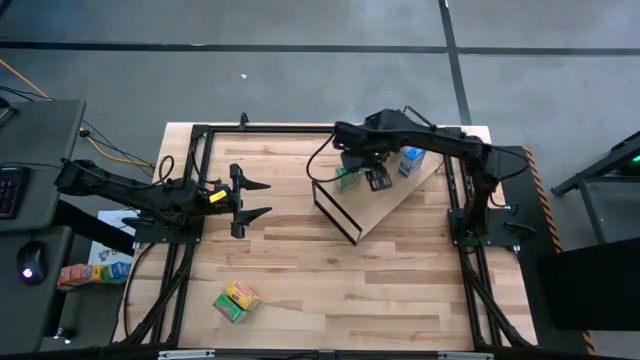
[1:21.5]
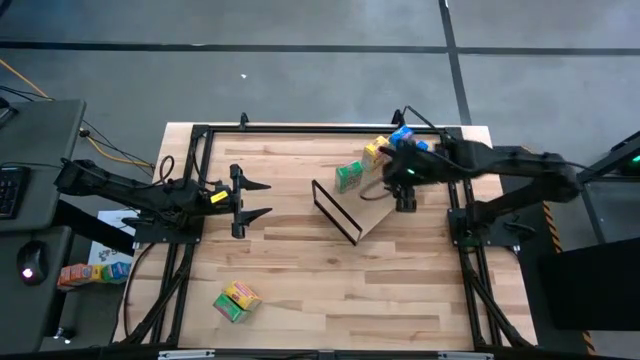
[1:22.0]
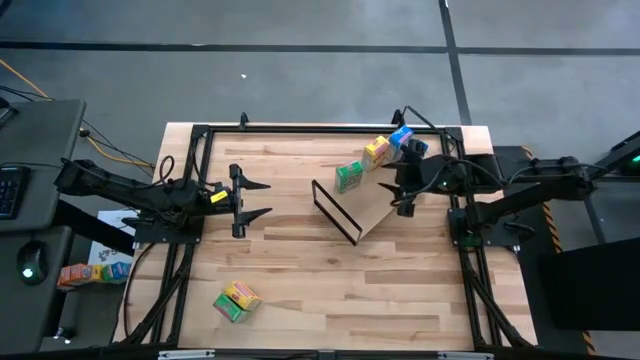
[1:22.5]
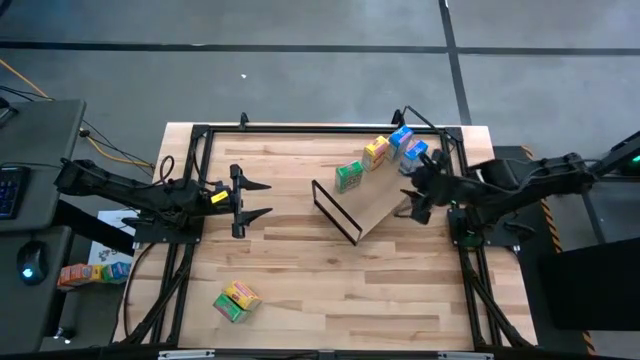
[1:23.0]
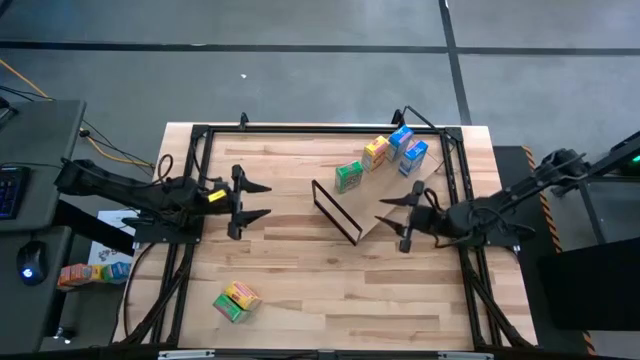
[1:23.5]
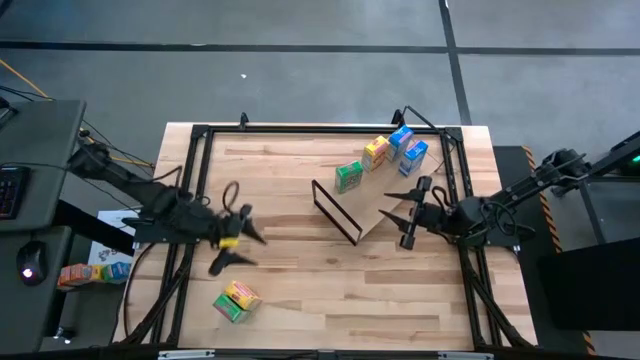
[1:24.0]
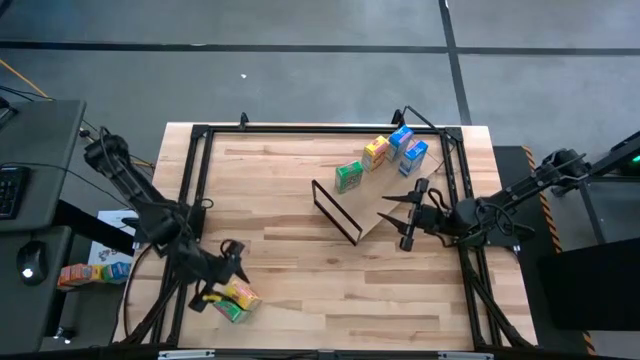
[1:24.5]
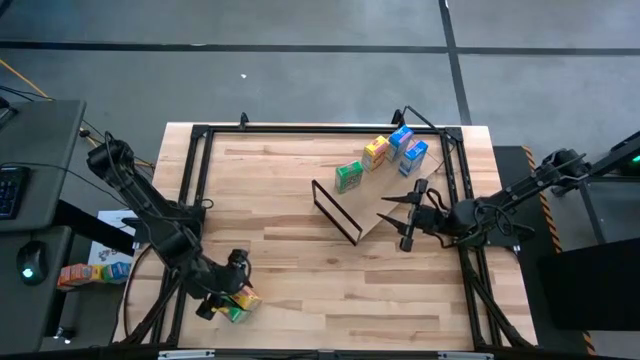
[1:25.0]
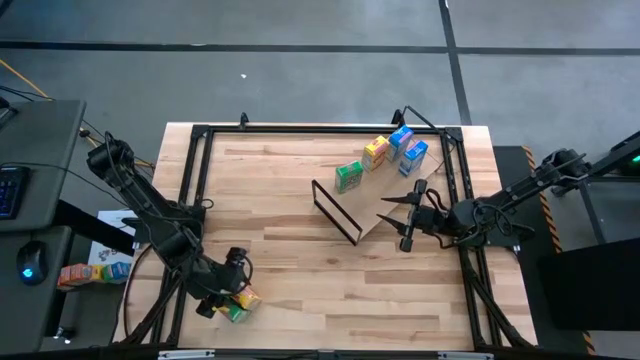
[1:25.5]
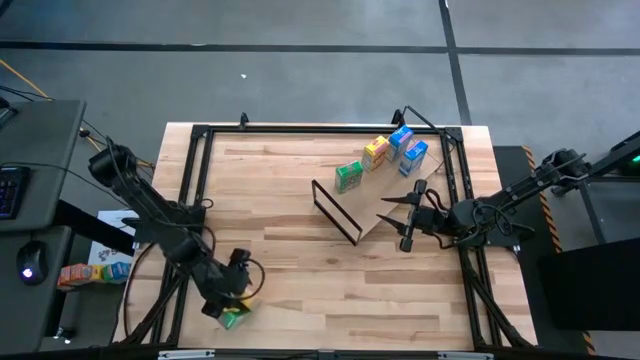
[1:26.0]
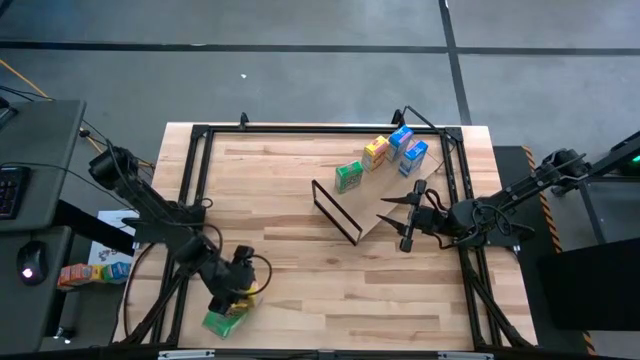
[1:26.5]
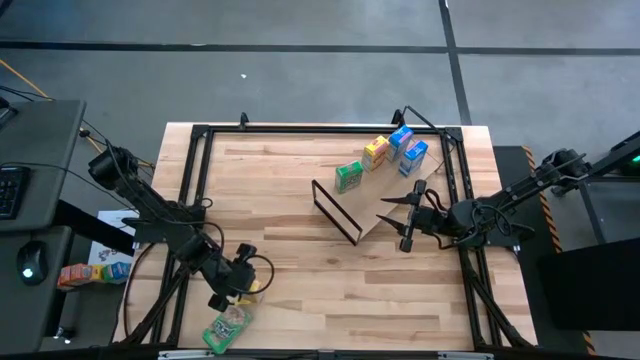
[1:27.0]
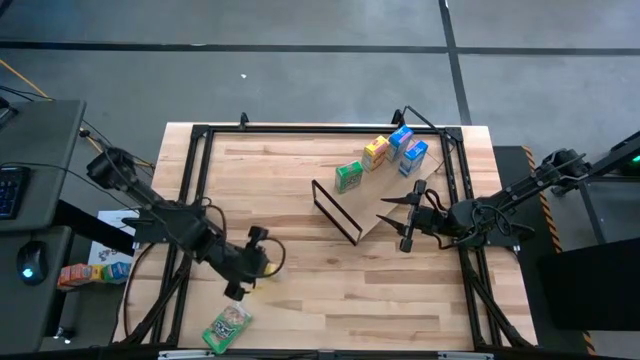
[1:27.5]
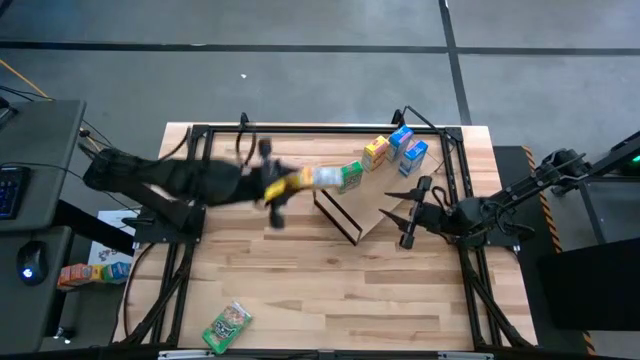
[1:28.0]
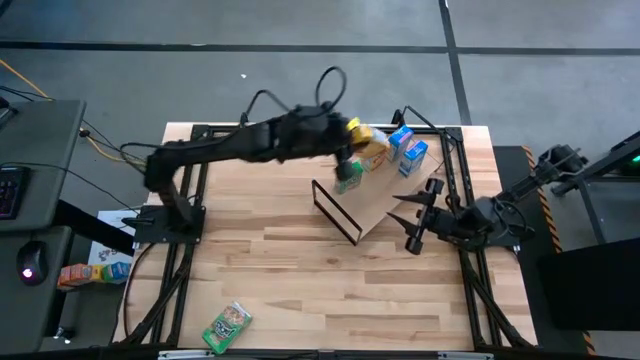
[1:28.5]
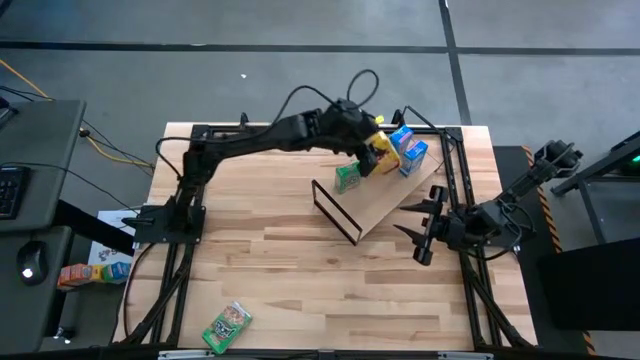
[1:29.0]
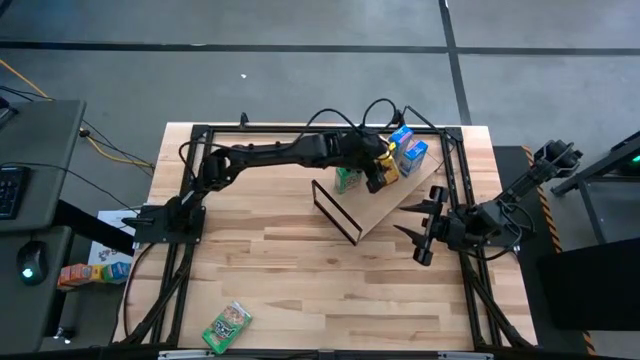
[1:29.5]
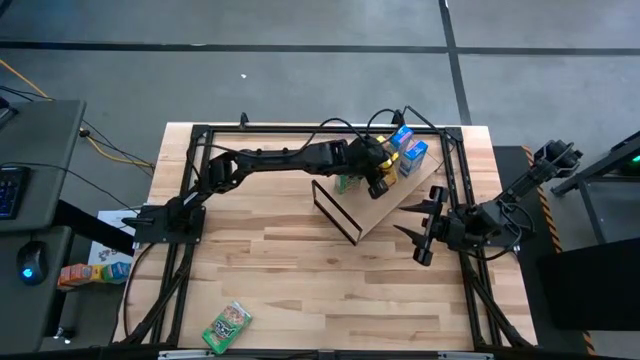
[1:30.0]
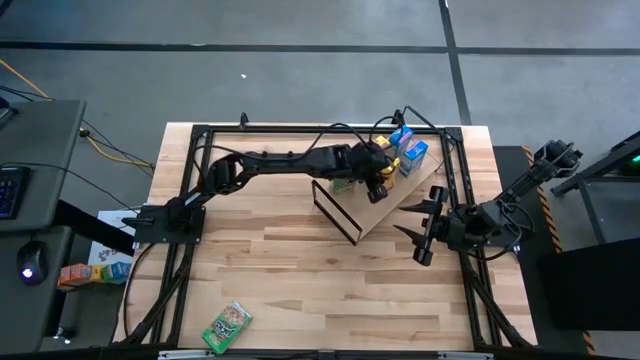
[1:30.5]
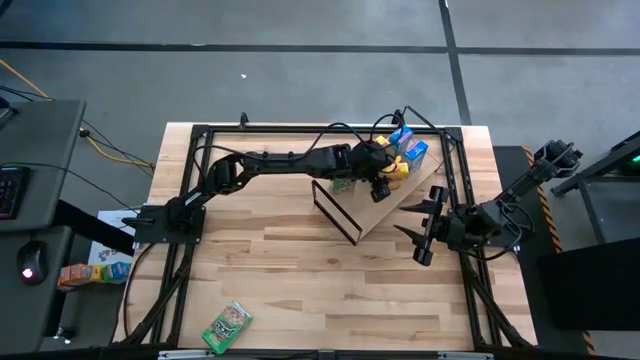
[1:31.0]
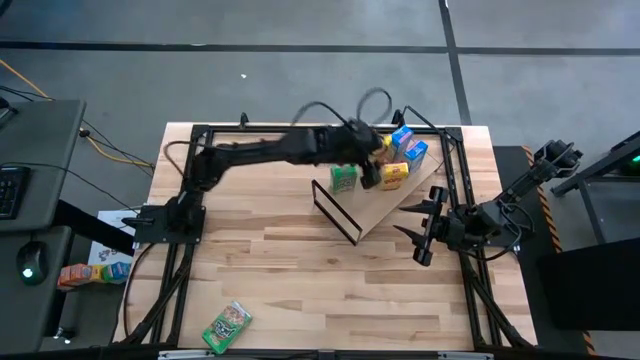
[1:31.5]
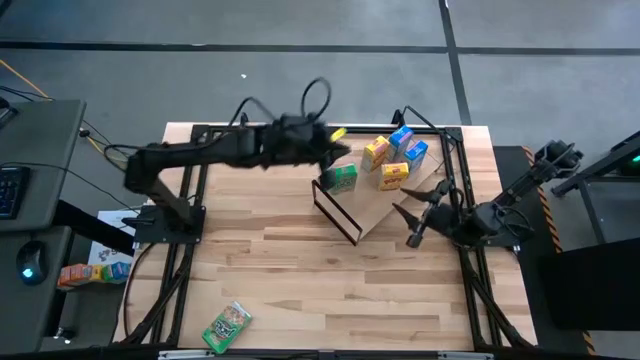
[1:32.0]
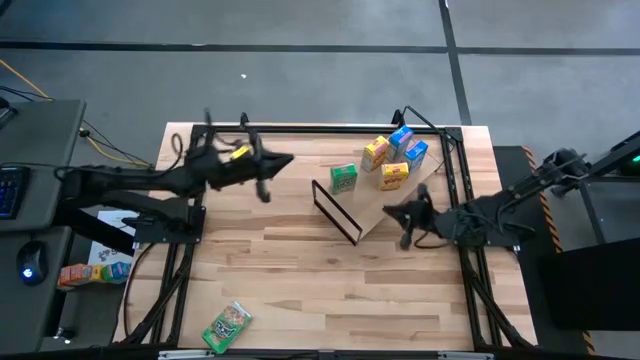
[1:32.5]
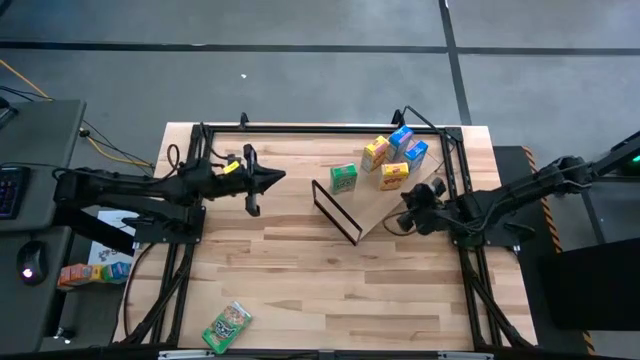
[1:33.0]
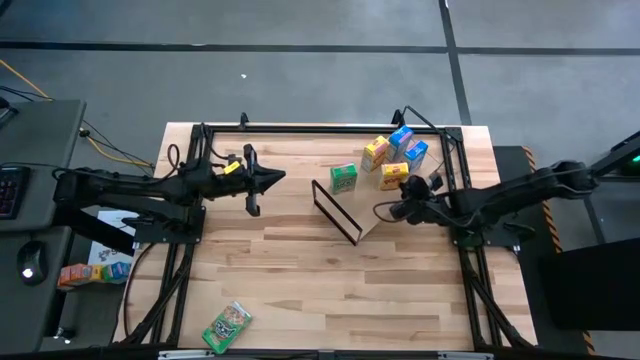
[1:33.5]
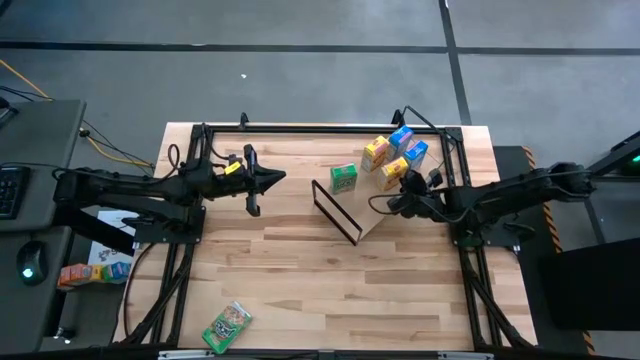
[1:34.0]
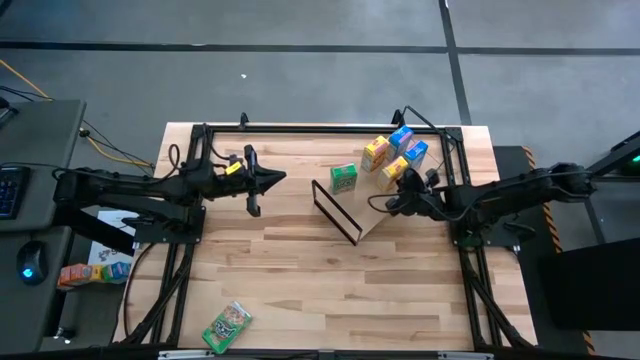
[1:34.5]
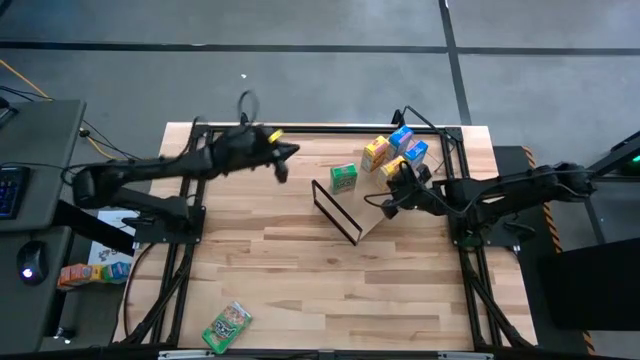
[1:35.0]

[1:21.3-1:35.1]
Task: Stack cereal on shelf
Put the yellow cereal box on the shelf aligned with the yellow cereal box

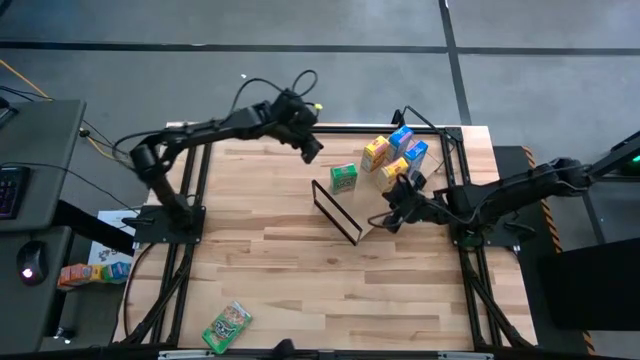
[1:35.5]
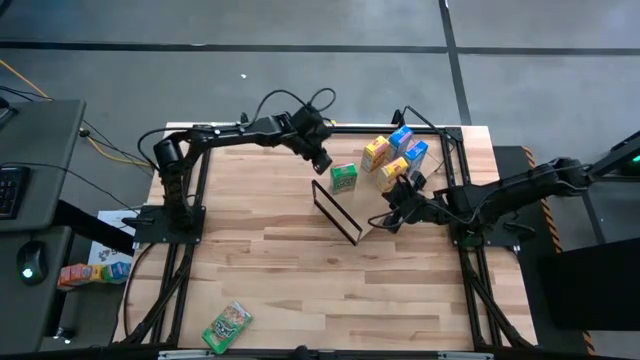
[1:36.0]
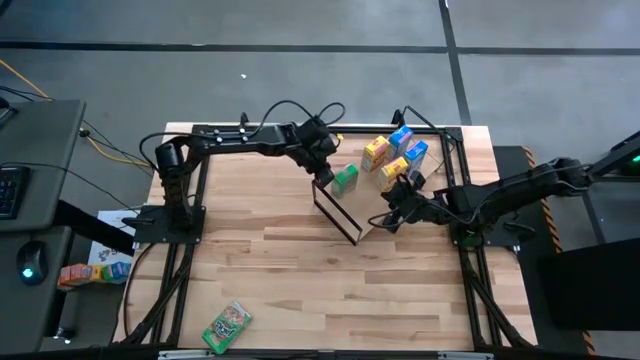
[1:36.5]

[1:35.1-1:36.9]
Adjust the green cereal box on the shelf

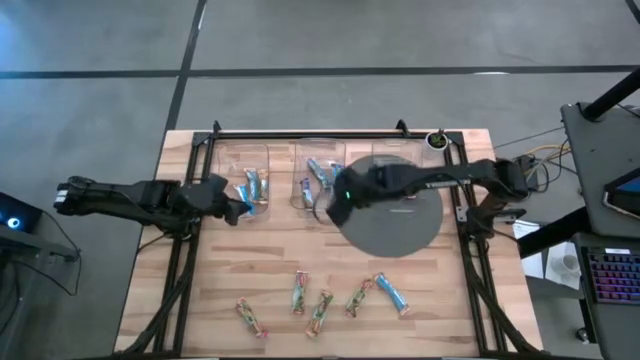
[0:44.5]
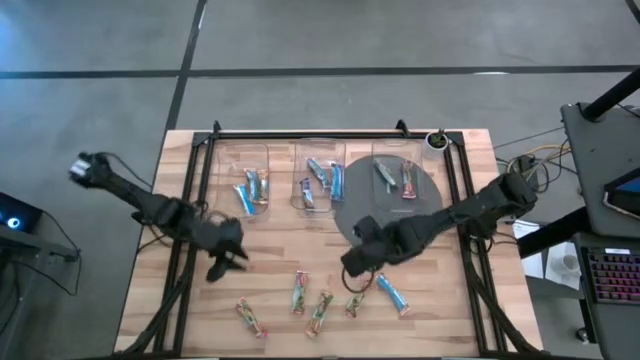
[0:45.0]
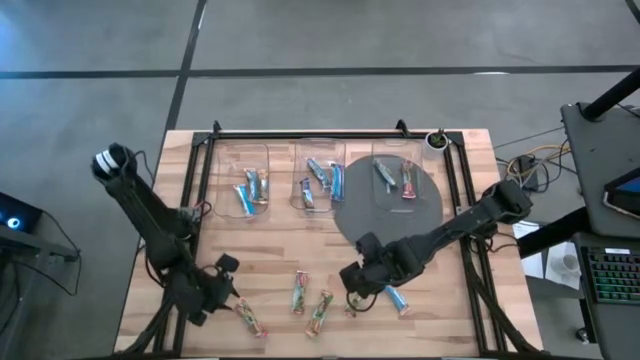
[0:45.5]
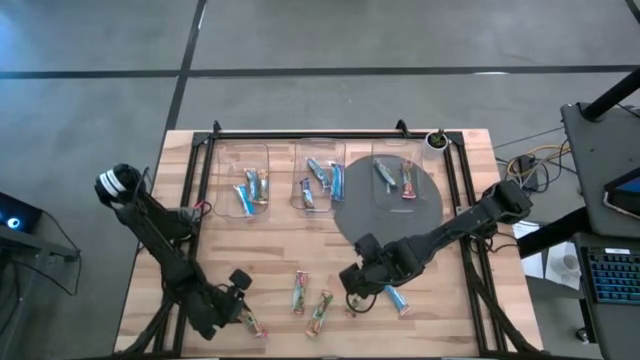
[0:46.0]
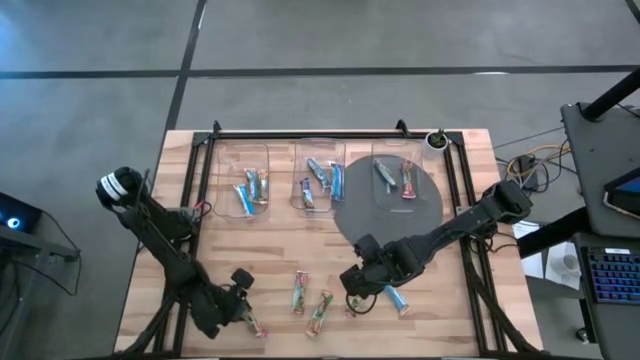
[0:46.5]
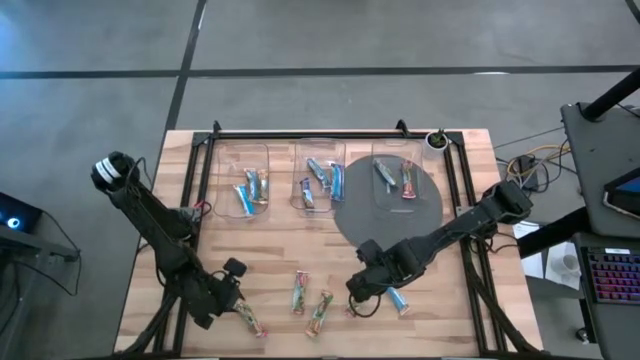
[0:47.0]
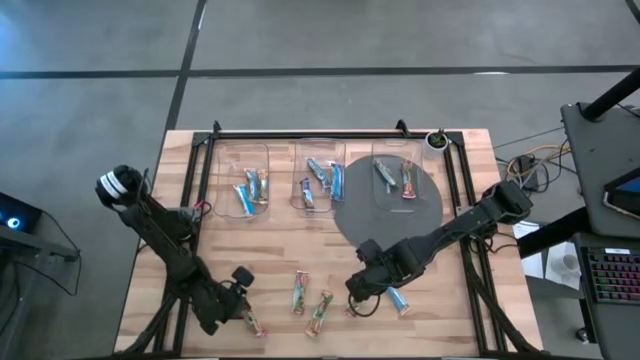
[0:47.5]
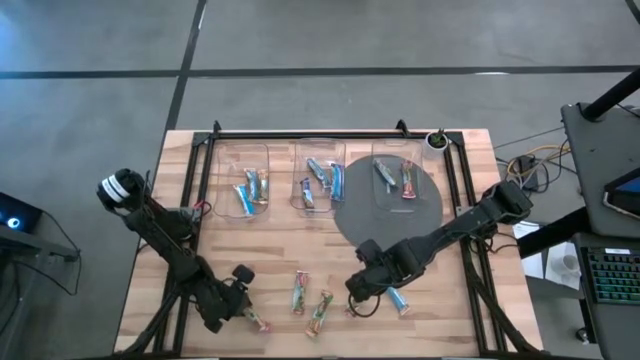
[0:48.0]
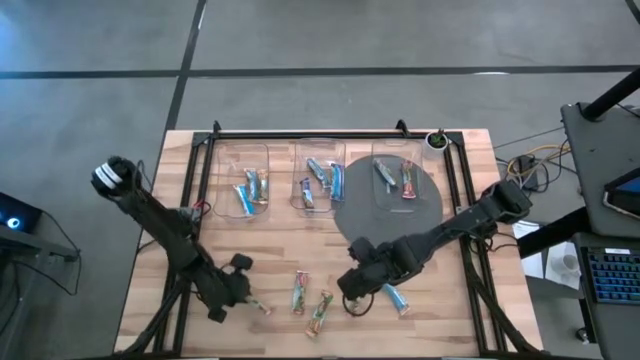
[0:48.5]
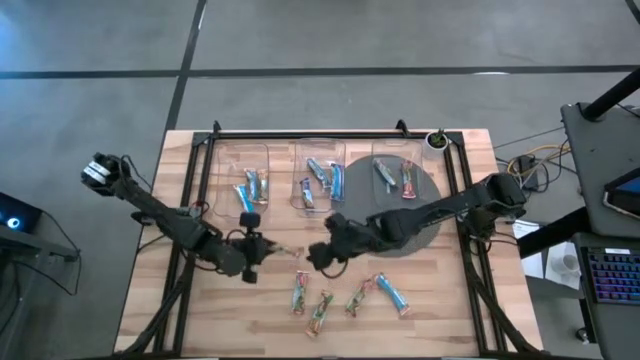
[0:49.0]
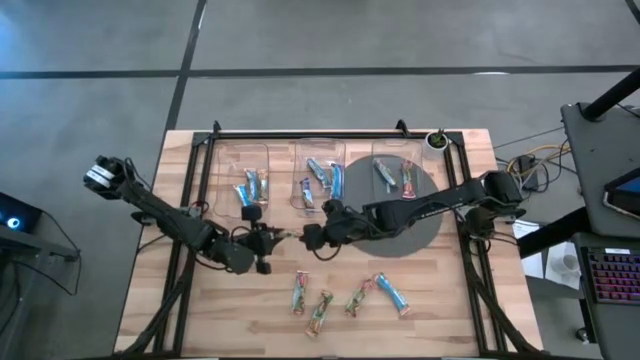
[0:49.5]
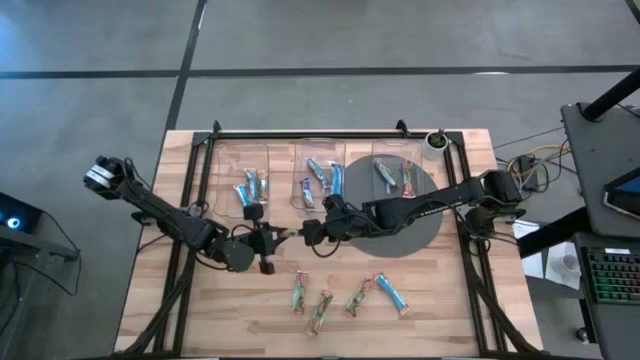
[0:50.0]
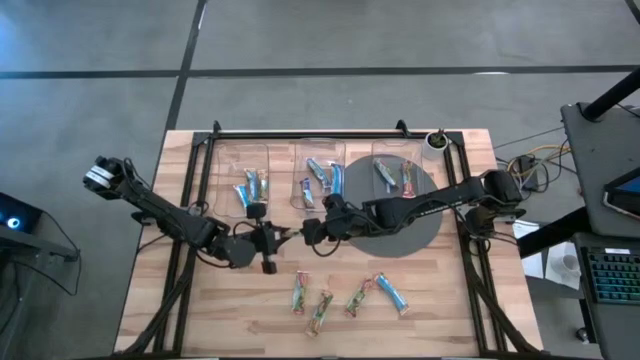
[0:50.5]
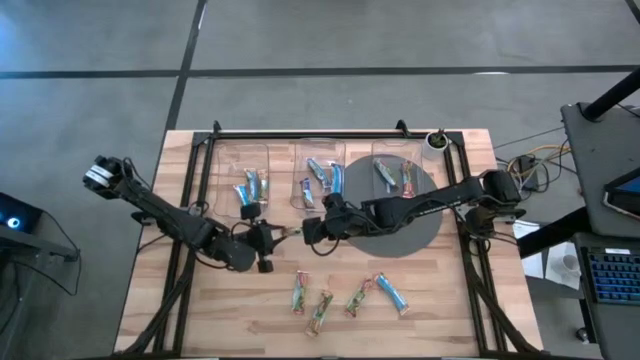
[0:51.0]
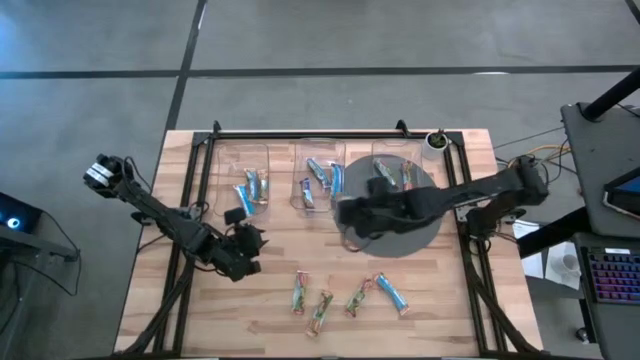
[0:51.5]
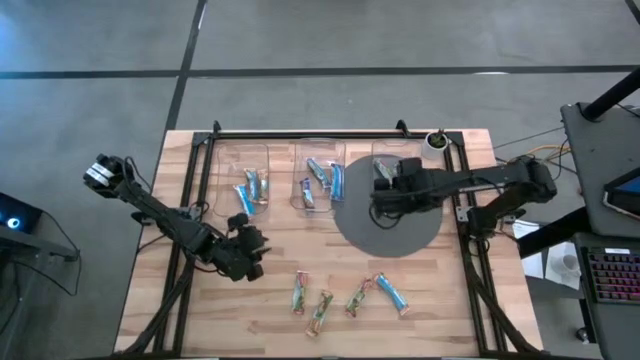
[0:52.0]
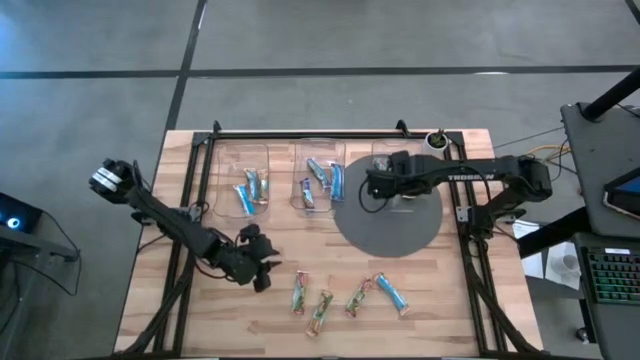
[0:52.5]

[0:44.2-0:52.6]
Task: Pick and place Granola Bars by type
Put the red granola bar into the right transparent container
